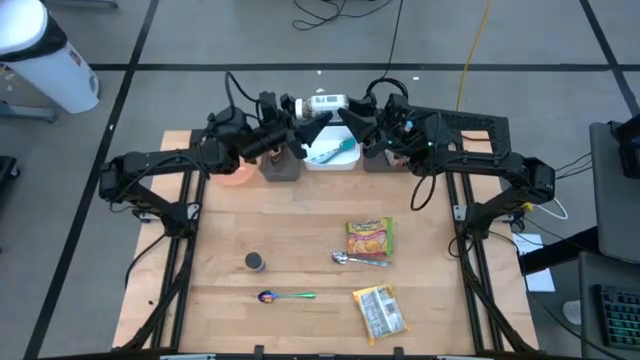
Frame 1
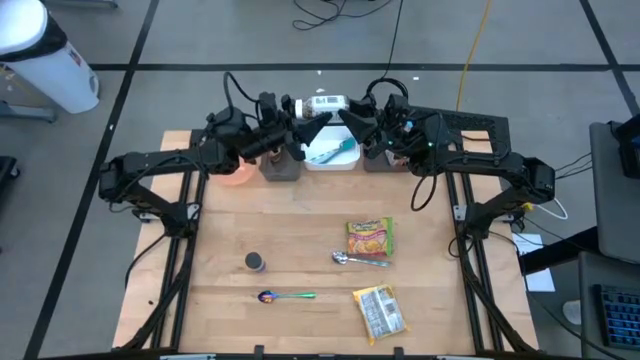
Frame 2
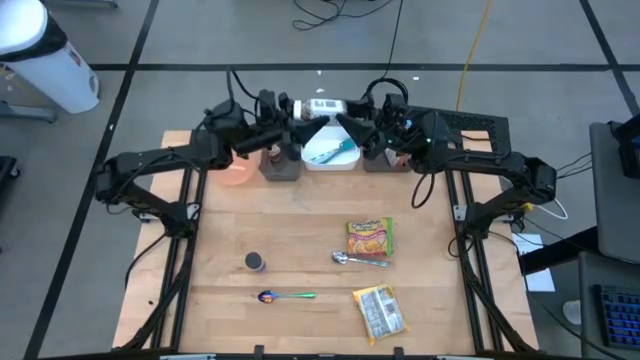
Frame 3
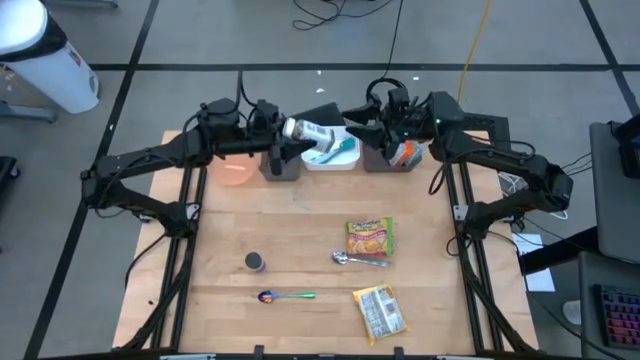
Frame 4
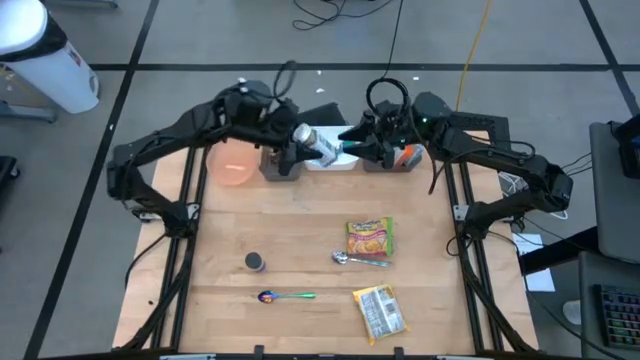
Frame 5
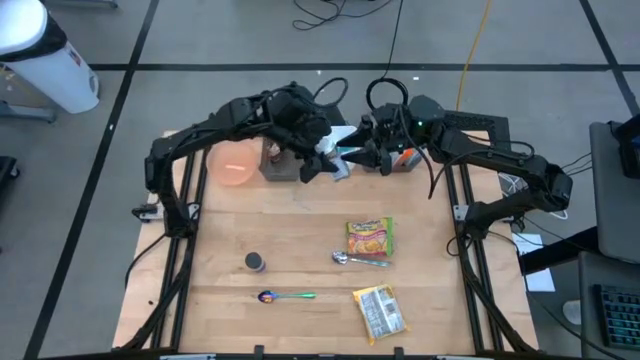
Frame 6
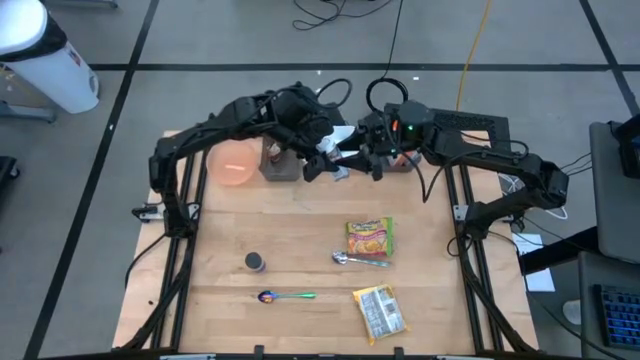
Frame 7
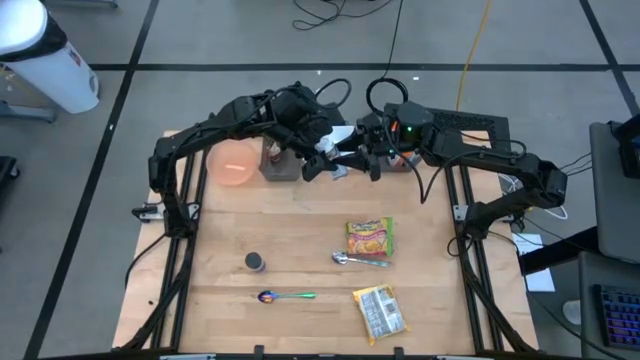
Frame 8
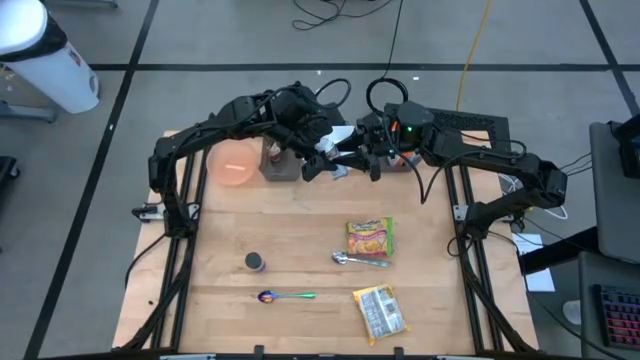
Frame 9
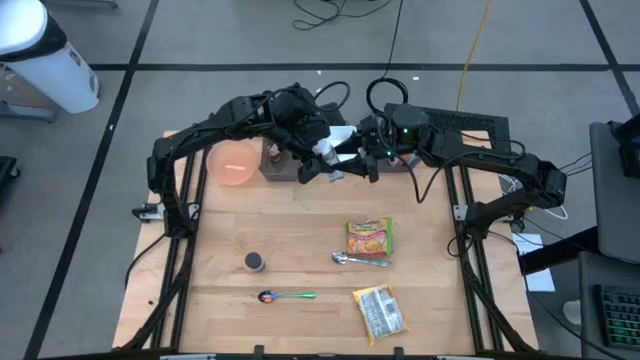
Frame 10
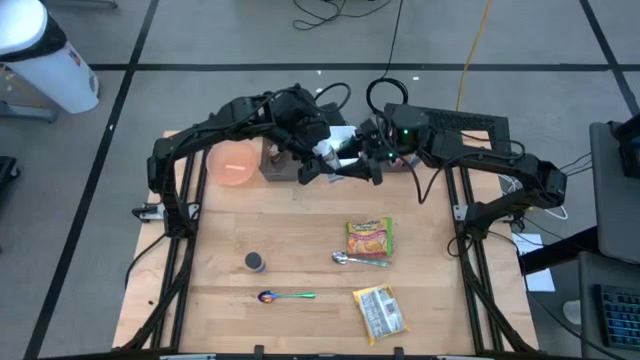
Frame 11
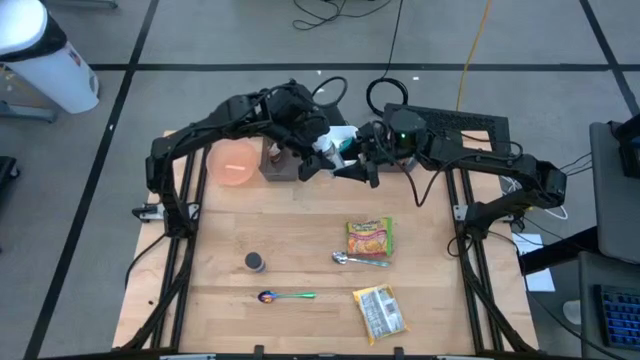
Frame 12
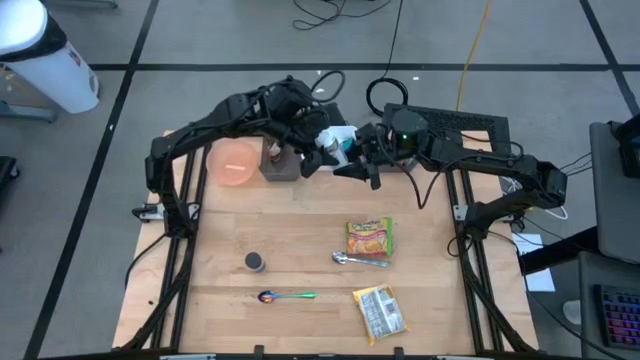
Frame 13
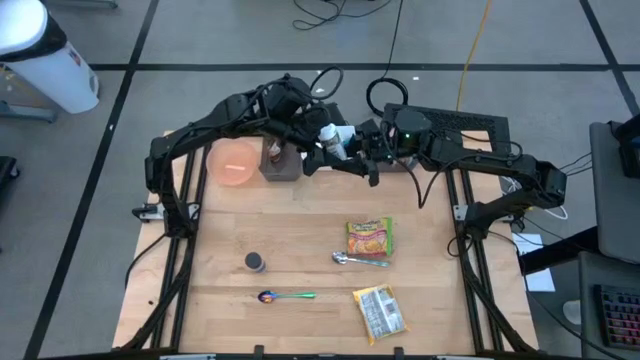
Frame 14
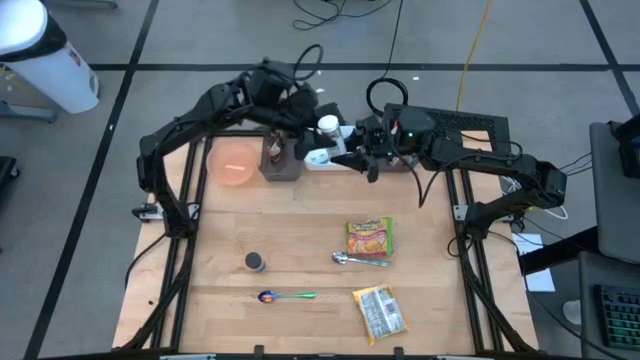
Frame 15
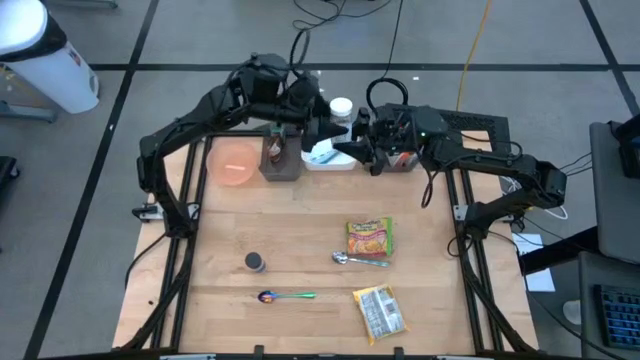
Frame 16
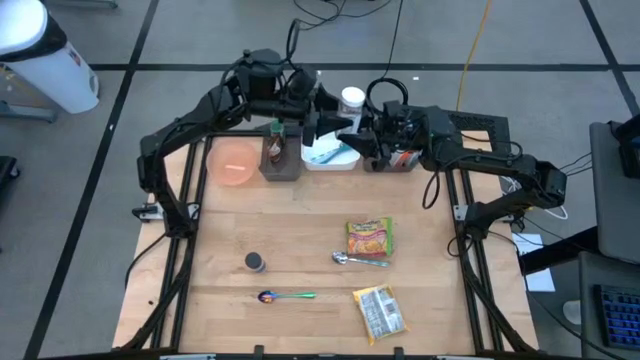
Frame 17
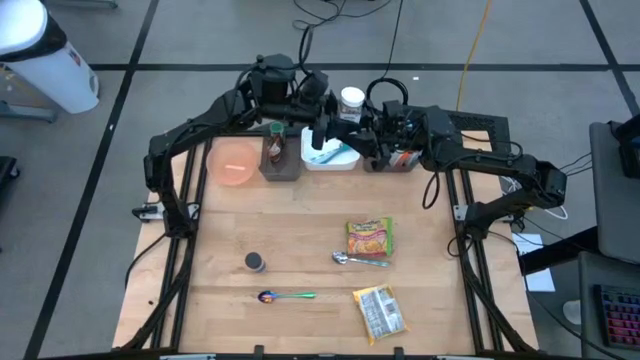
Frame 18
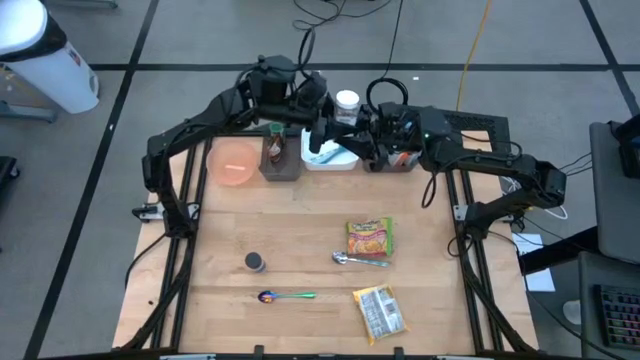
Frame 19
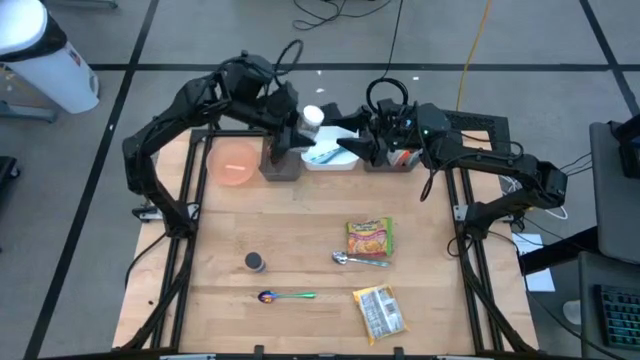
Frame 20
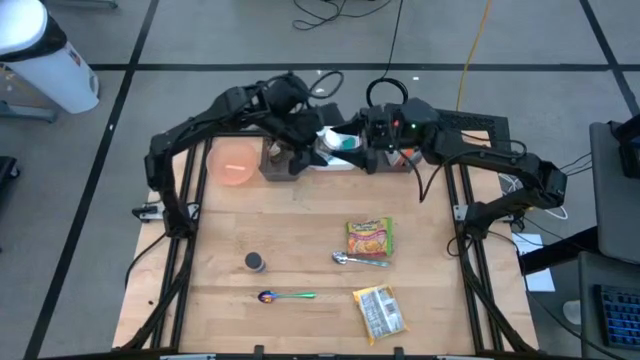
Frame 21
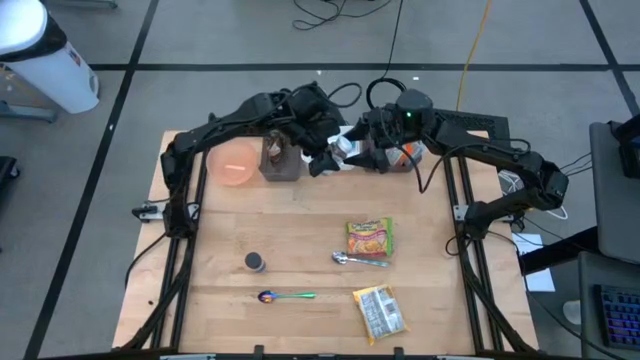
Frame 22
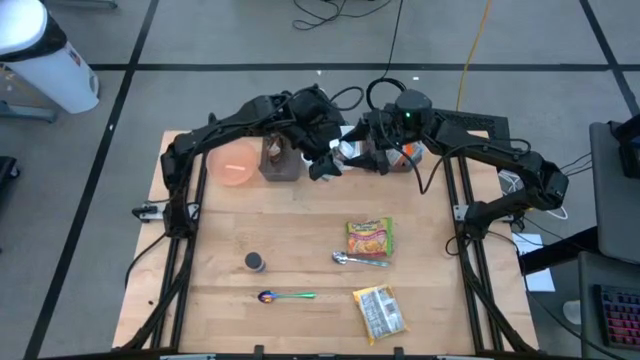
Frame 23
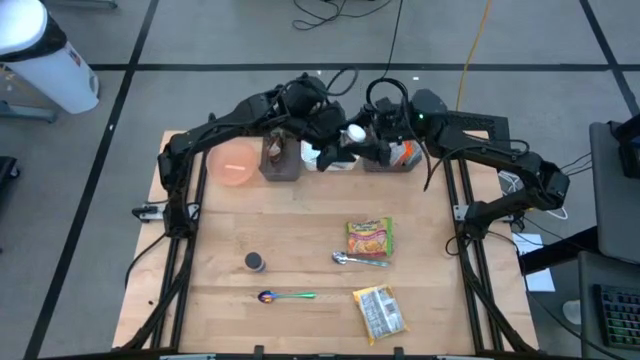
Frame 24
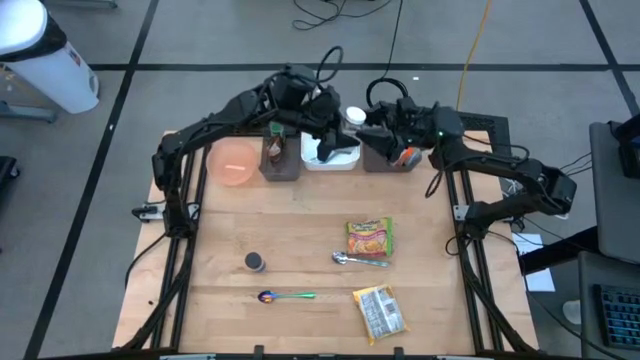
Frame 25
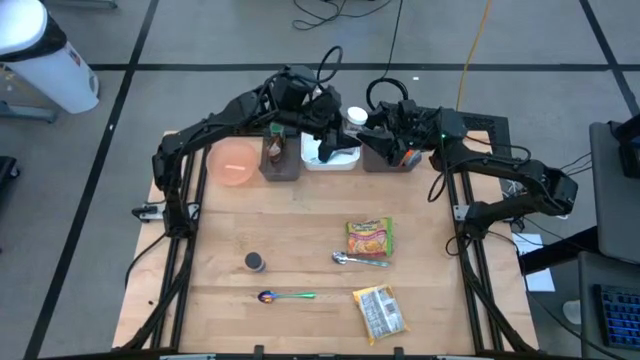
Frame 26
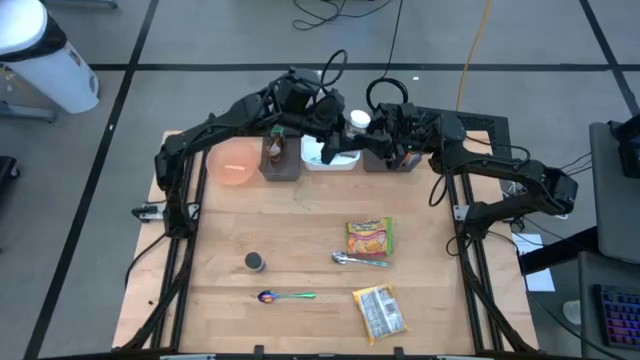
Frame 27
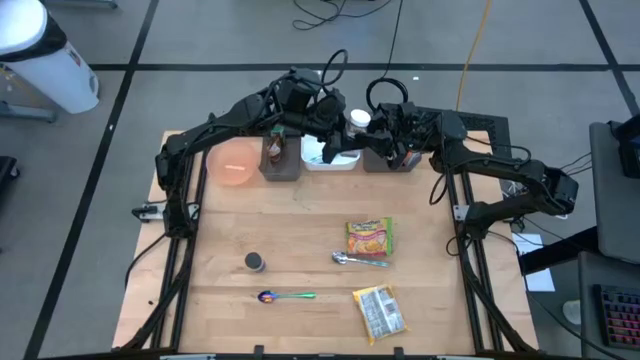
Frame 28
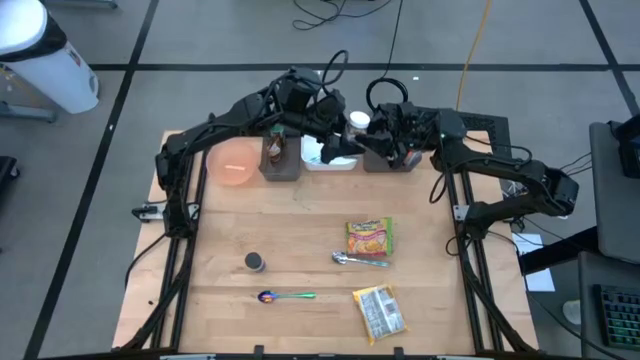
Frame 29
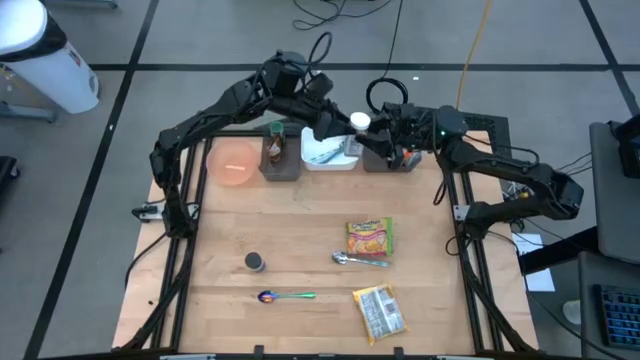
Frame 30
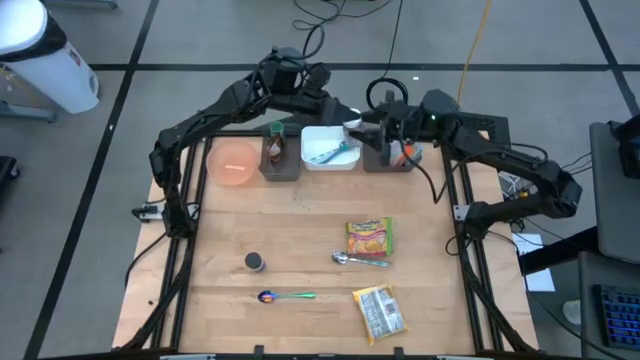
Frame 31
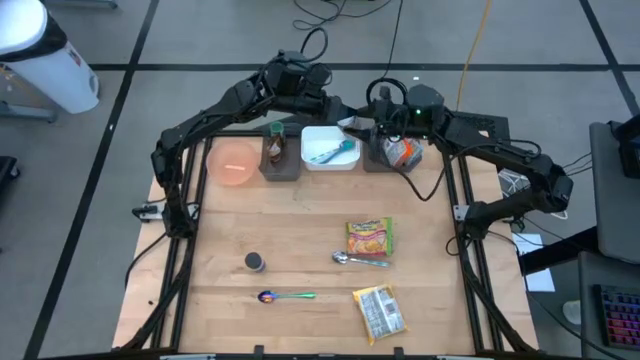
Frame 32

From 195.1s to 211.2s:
Task: Pick & Place Food Item
Put the white seasoning bottle into the left black bin

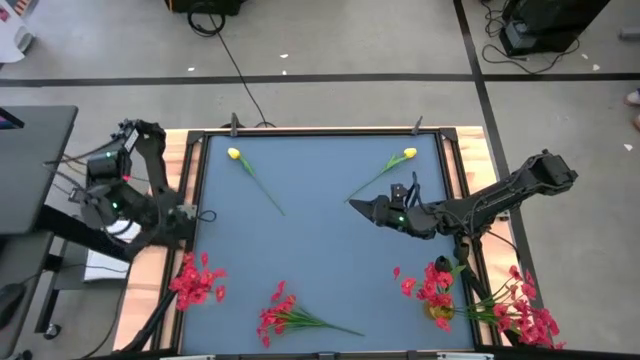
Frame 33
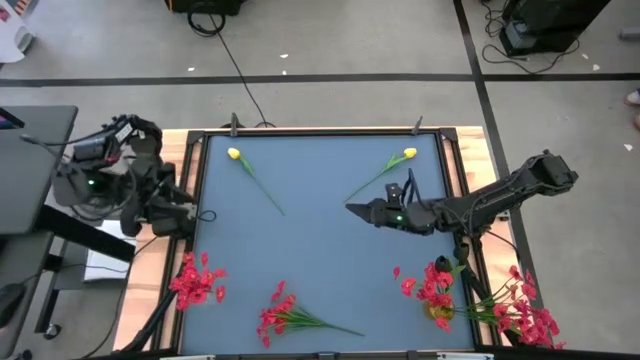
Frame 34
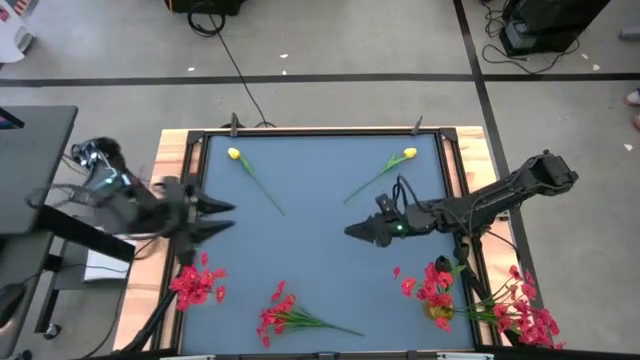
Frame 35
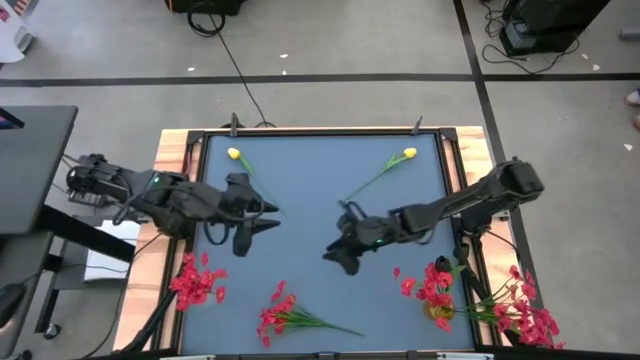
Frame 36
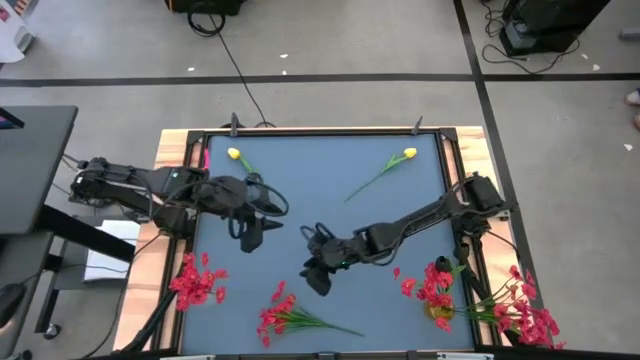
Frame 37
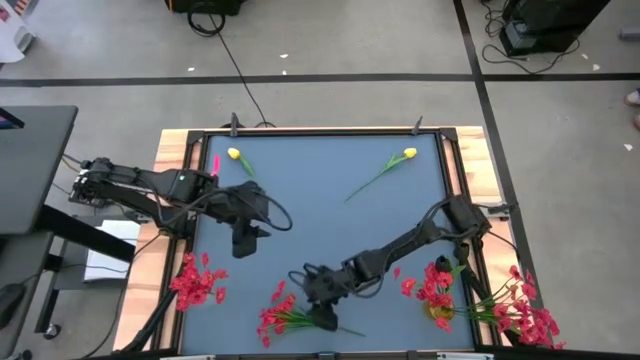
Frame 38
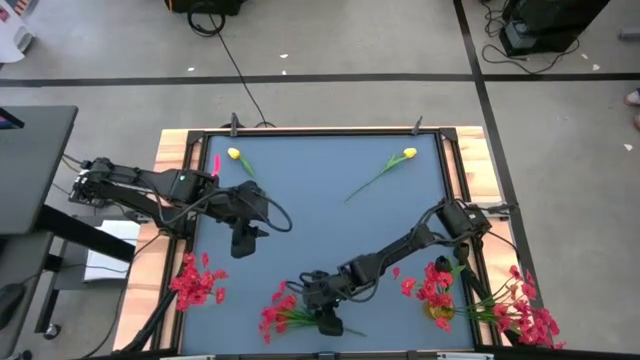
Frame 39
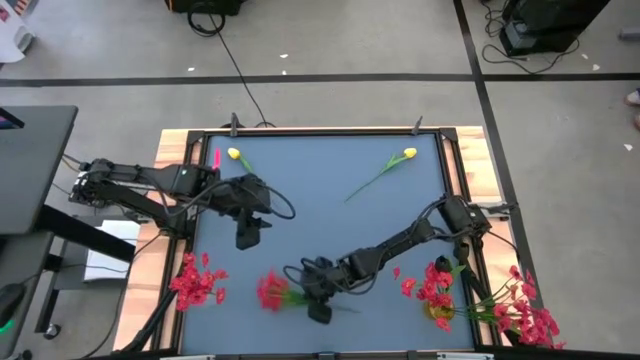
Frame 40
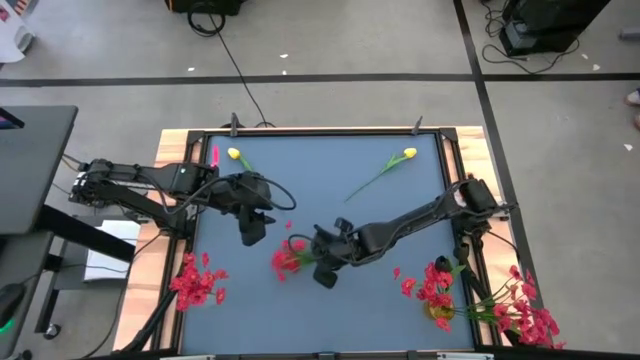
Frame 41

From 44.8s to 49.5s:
Task: Sort flowers into vase by color
Put the red flowers into the transparent vase
